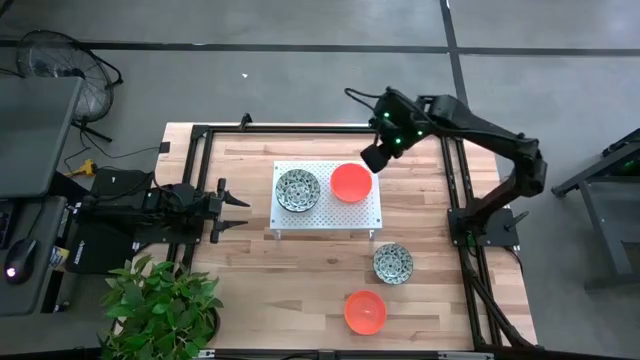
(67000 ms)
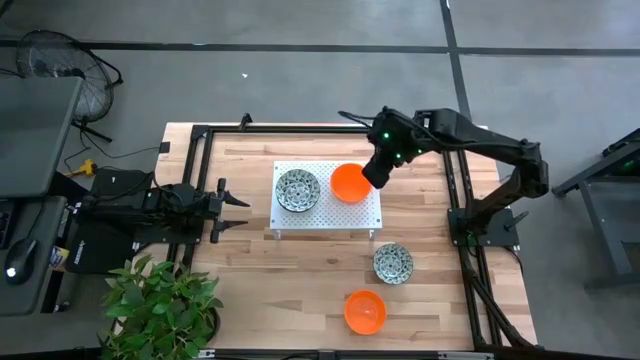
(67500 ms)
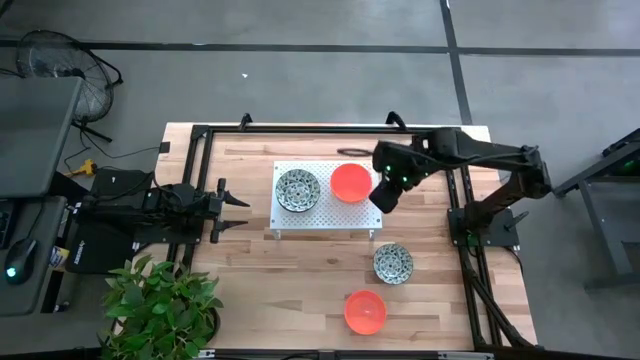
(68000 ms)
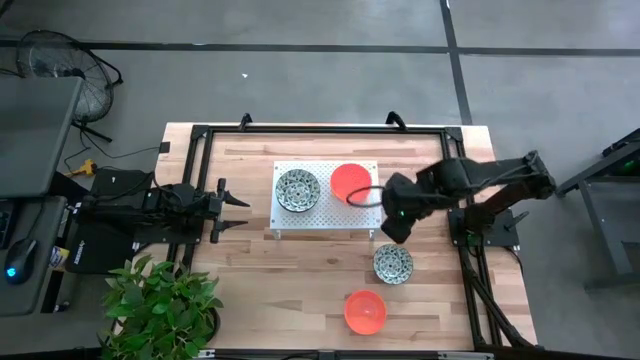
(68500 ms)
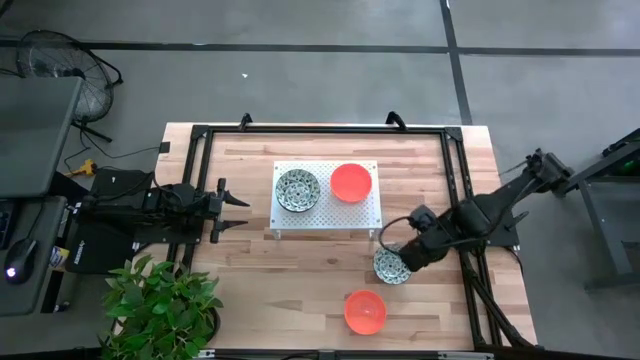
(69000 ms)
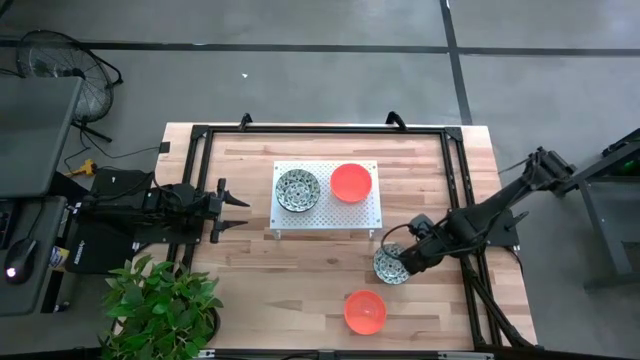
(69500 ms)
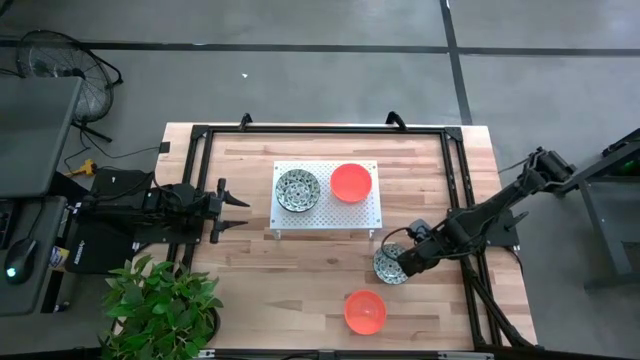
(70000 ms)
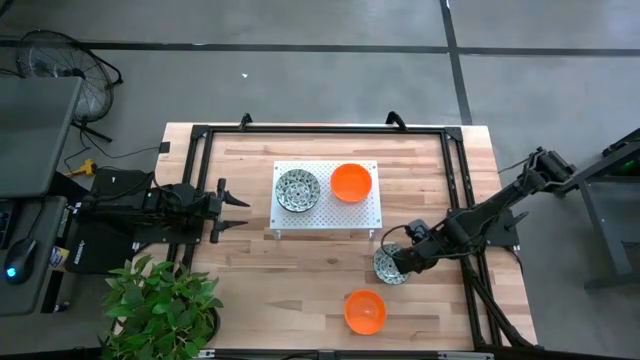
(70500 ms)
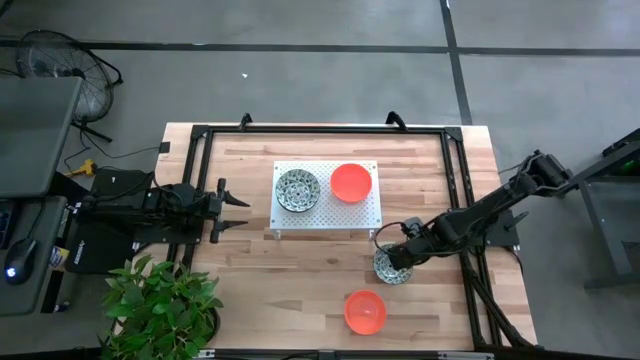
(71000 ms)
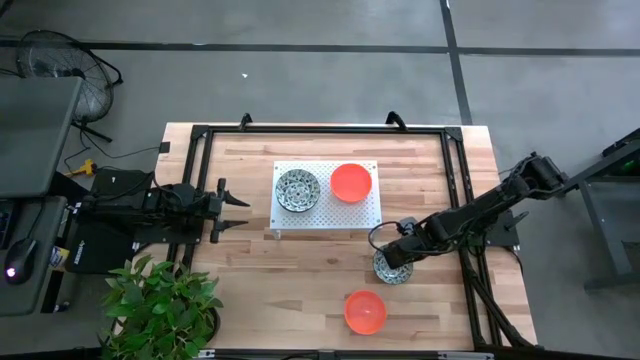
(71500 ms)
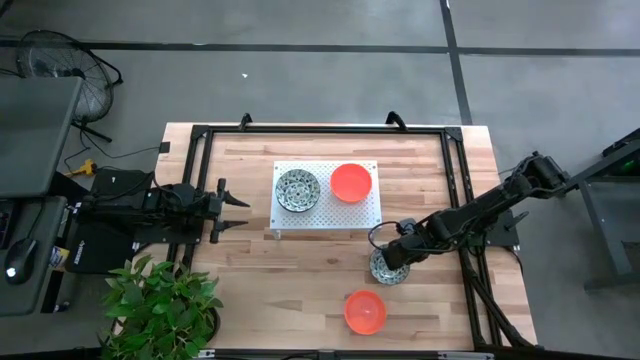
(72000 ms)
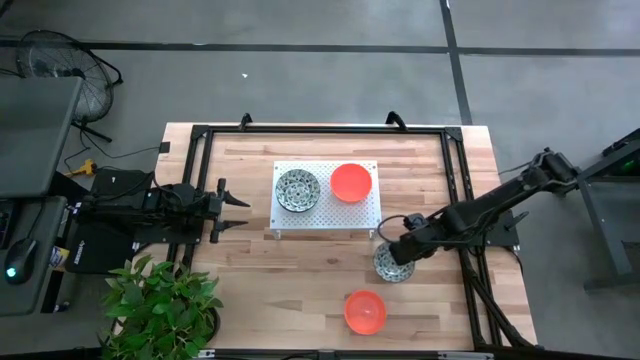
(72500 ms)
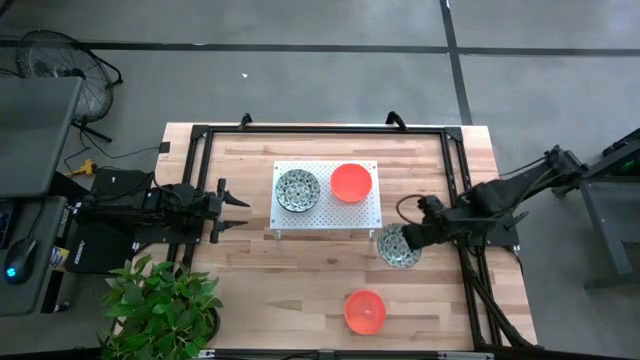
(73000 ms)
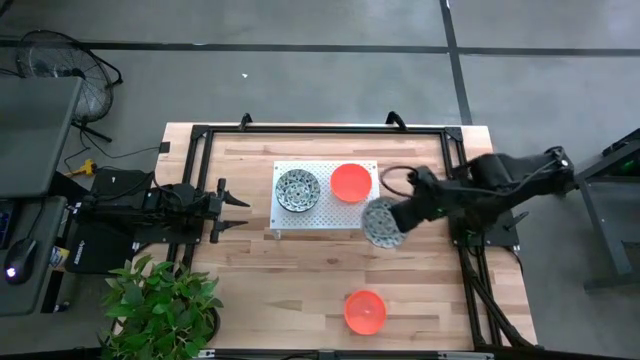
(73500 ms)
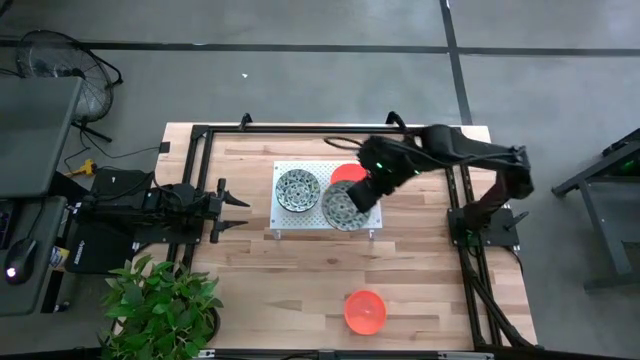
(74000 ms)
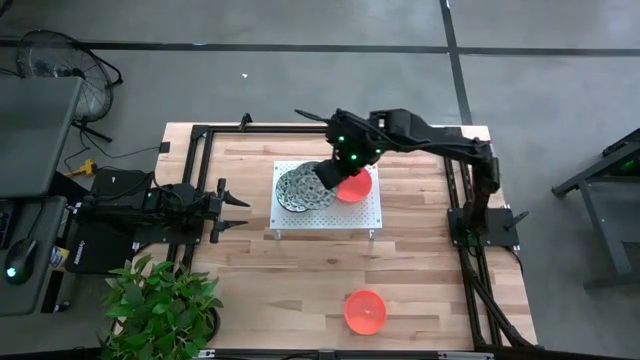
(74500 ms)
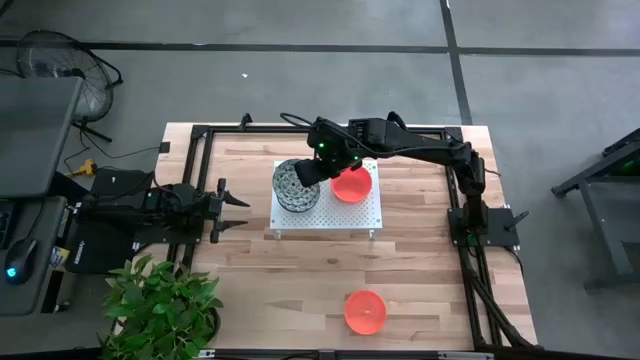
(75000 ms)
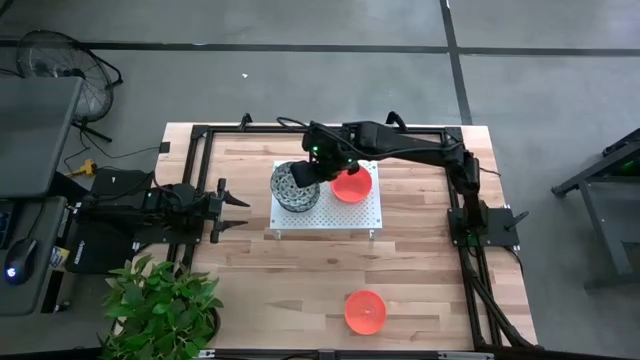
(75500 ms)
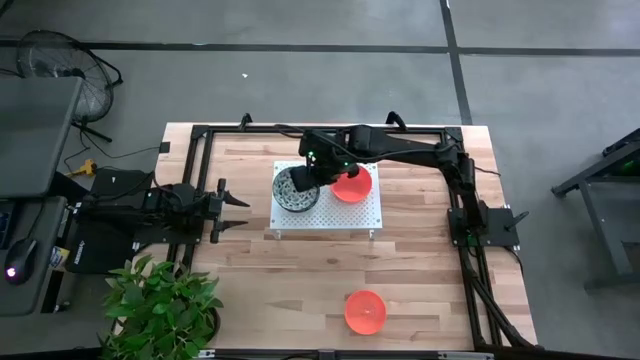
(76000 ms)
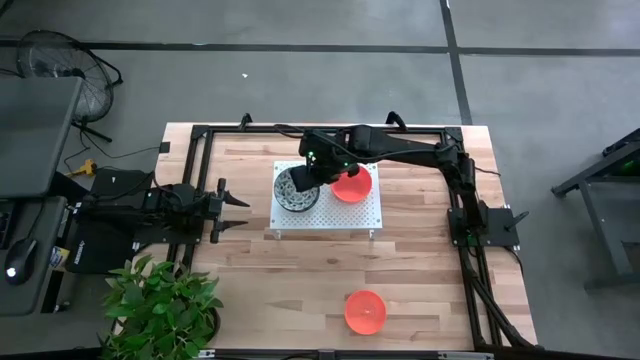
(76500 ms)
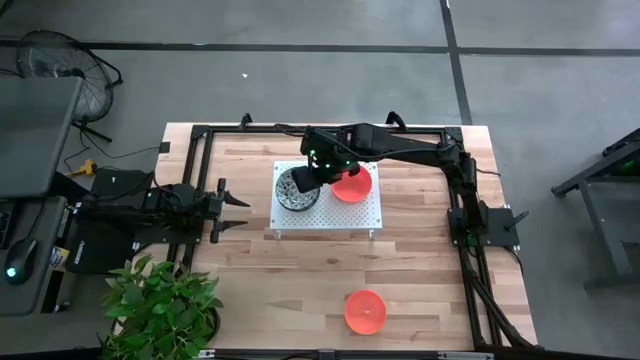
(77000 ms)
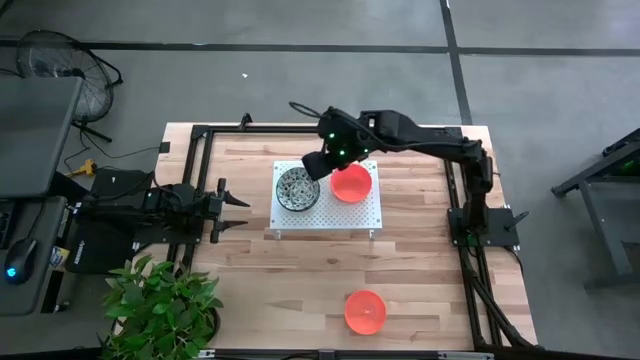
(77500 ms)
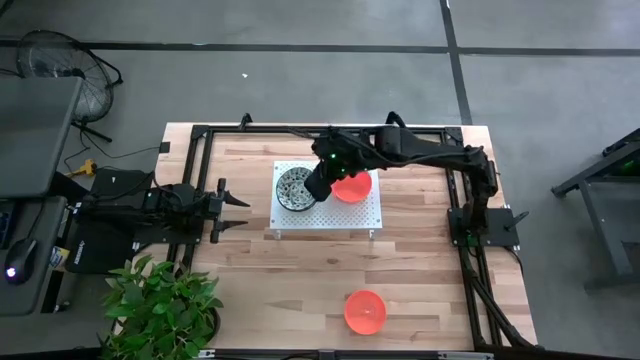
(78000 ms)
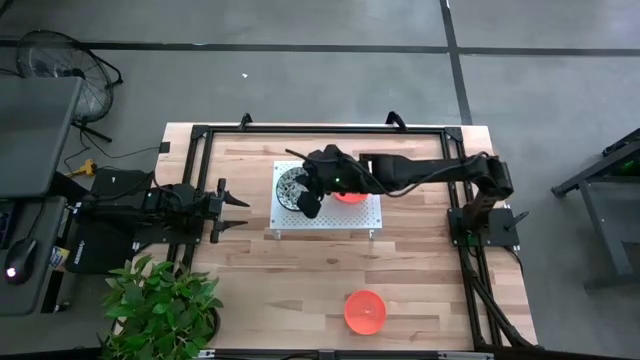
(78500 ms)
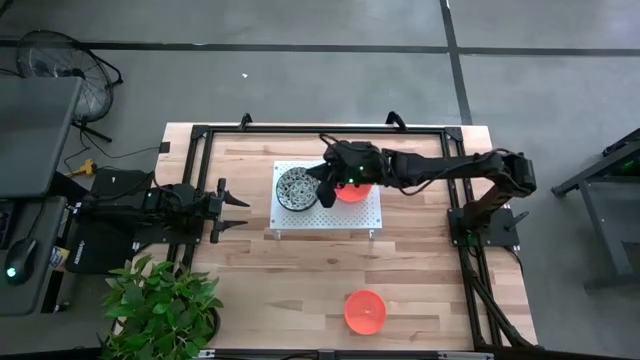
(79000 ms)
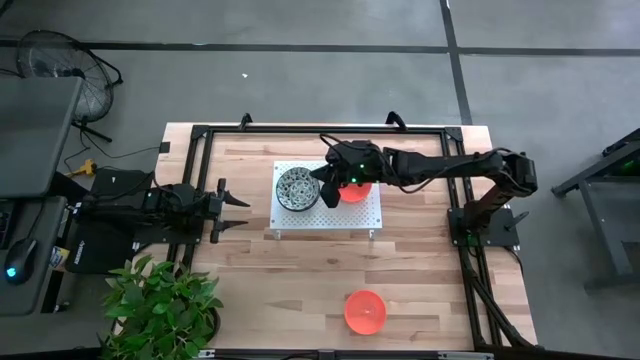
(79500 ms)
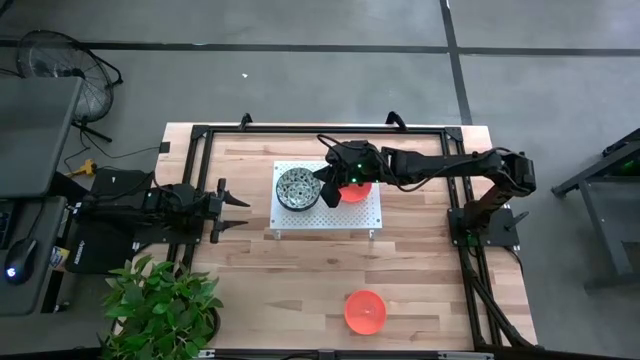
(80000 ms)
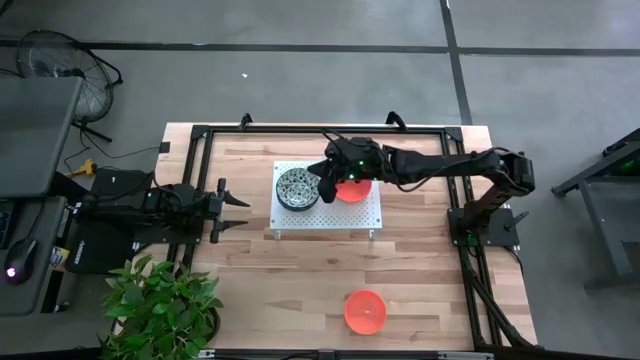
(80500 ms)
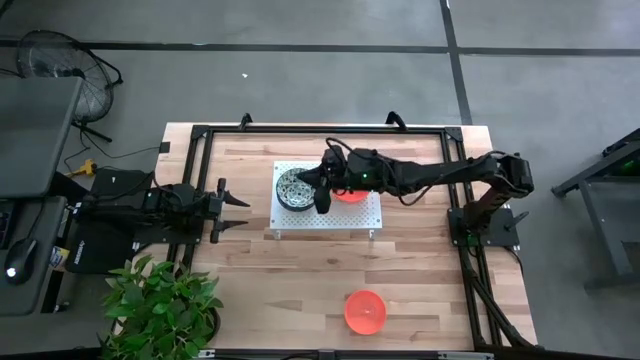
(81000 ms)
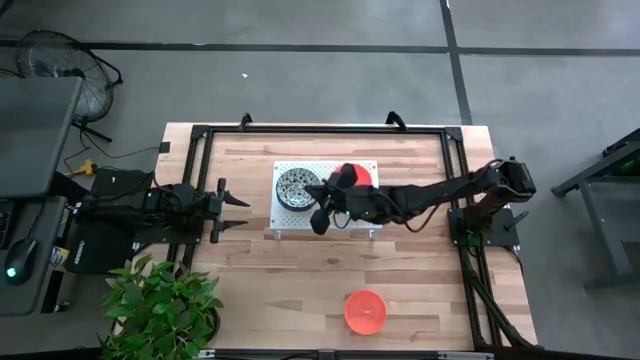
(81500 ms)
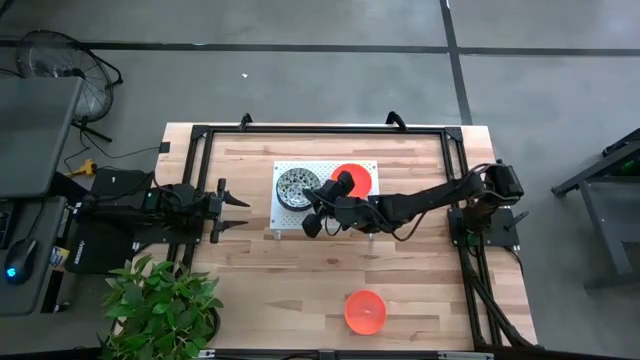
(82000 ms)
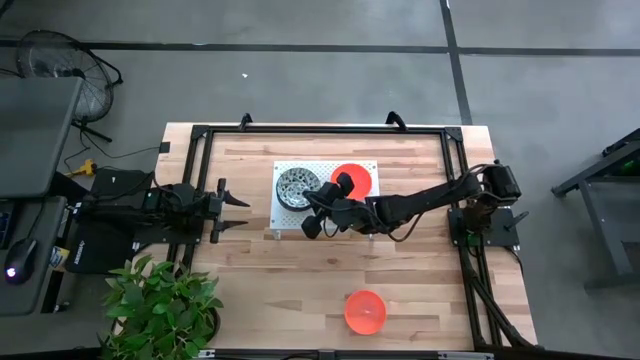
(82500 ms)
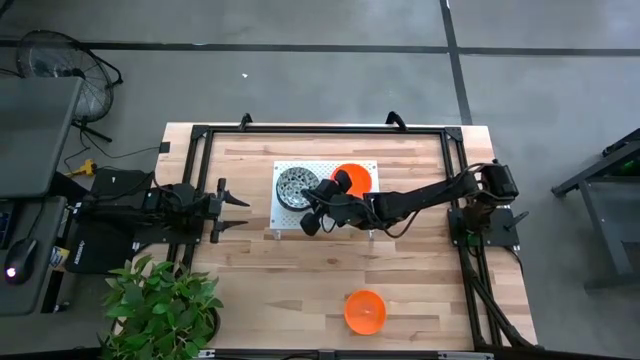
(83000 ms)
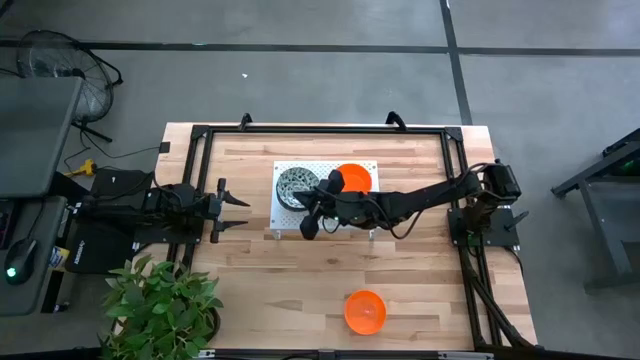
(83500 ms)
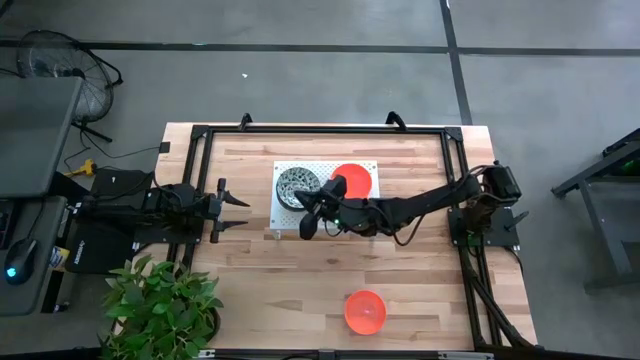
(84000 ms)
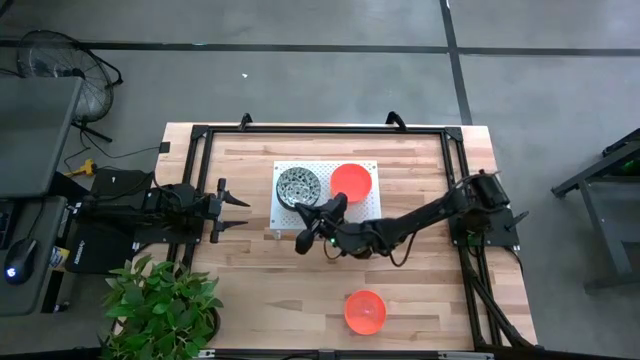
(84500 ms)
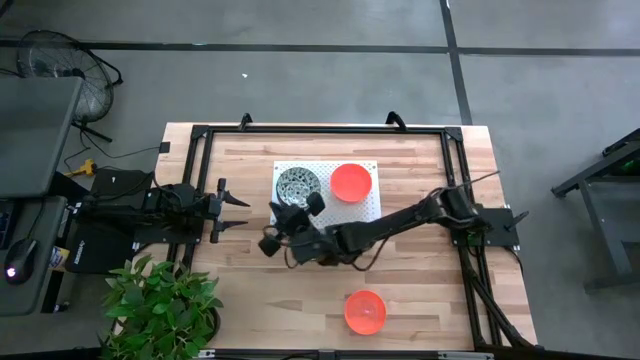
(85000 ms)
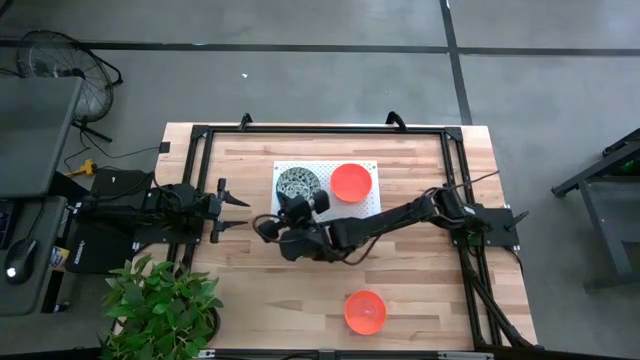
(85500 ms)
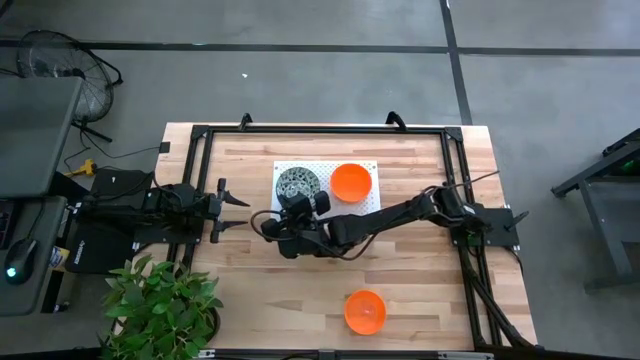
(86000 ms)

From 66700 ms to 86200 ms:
Task: Pick & Place Mini bowls
Stack the white patterned bowl on the white patterned bowl on the shelf

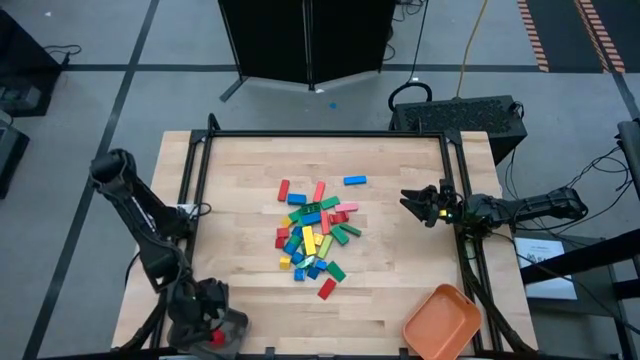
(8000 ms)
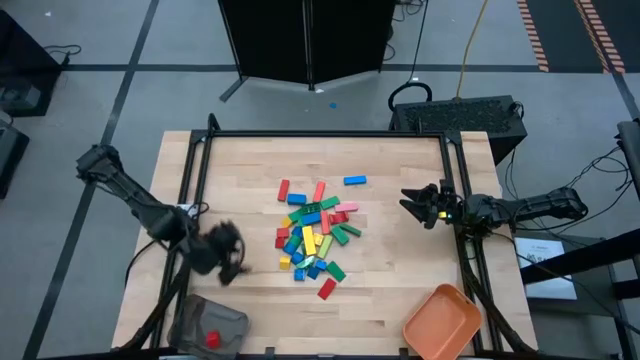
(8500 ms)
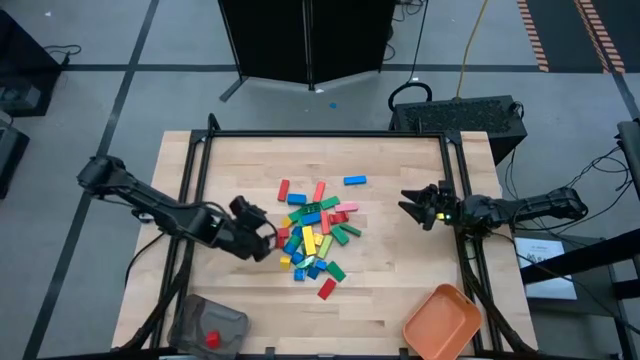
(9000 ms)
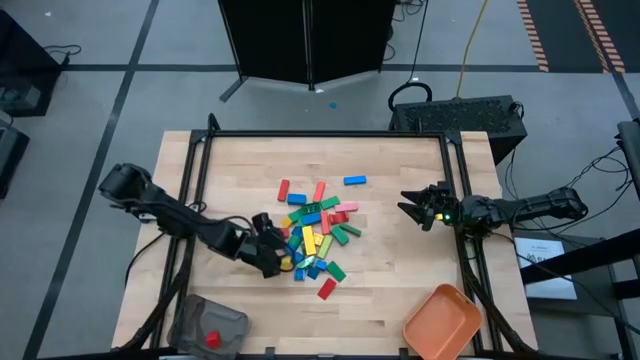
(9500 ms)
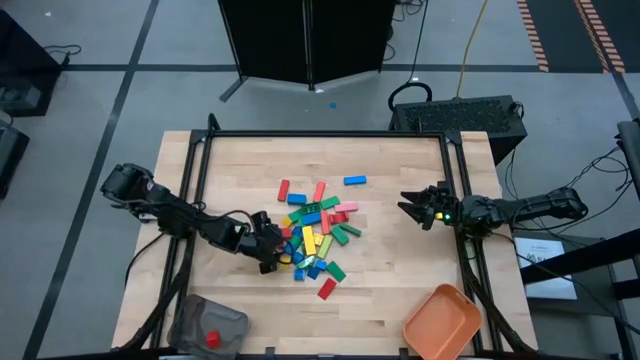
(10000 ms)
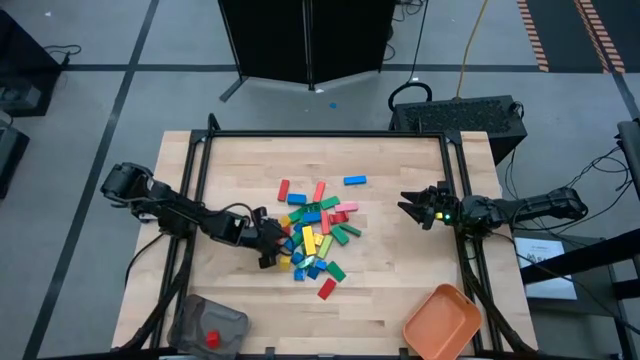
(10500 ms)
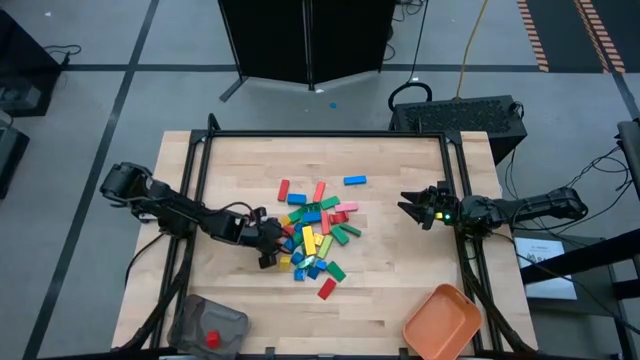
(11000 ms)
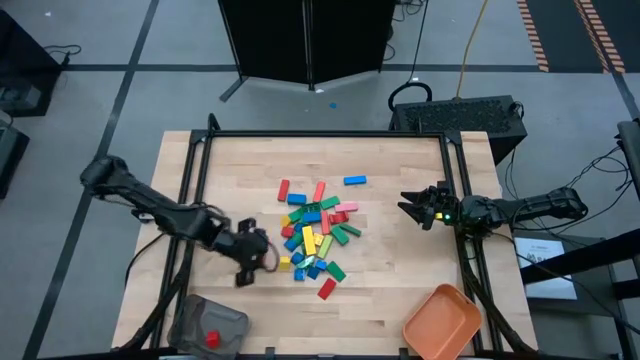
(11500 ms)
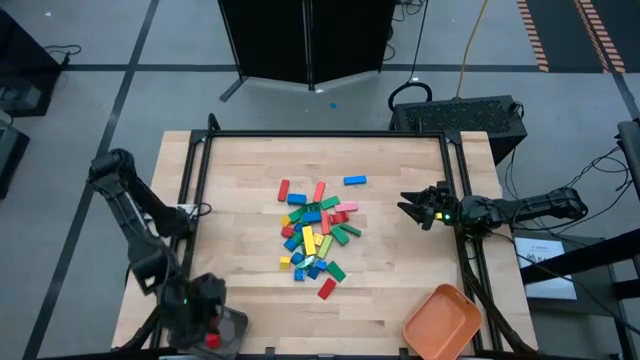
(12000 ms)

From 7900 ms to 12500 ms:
Task: Sort blocks by size
Put the red triangular block into the black bin
